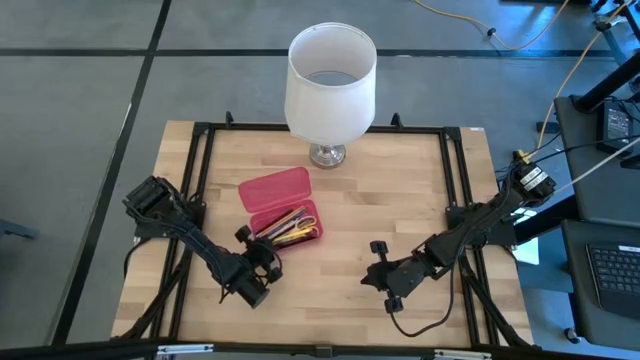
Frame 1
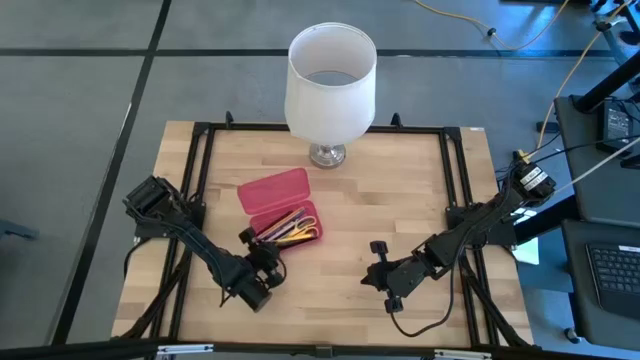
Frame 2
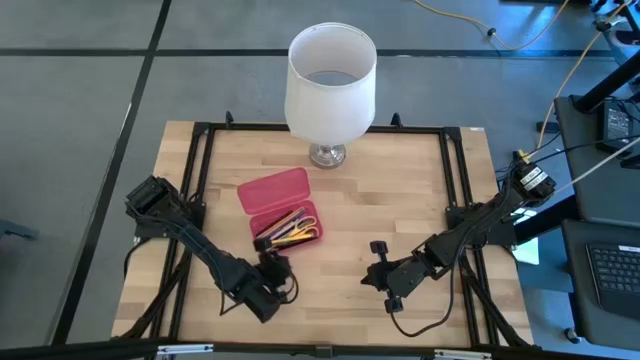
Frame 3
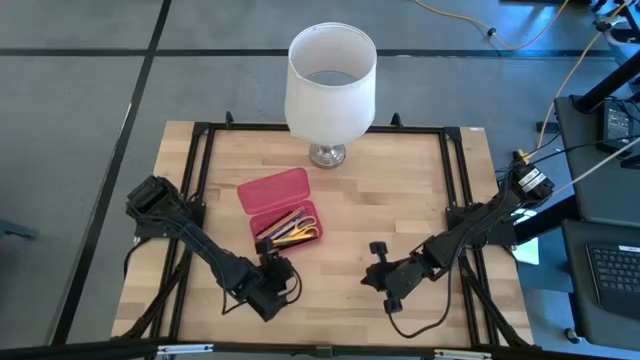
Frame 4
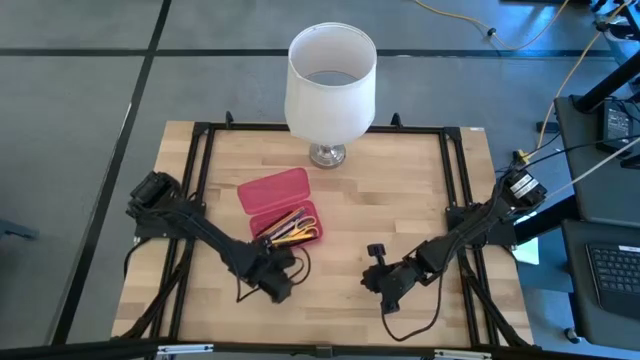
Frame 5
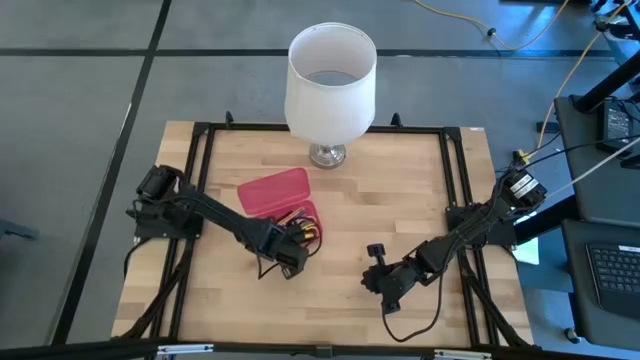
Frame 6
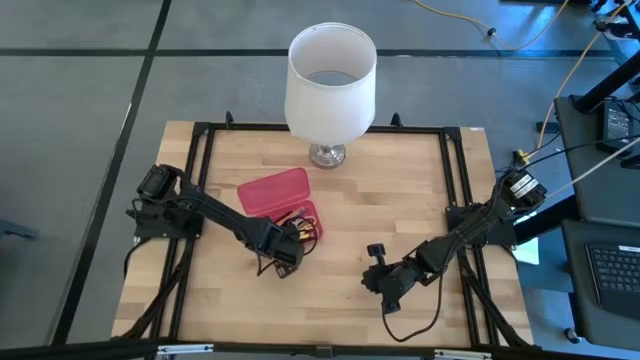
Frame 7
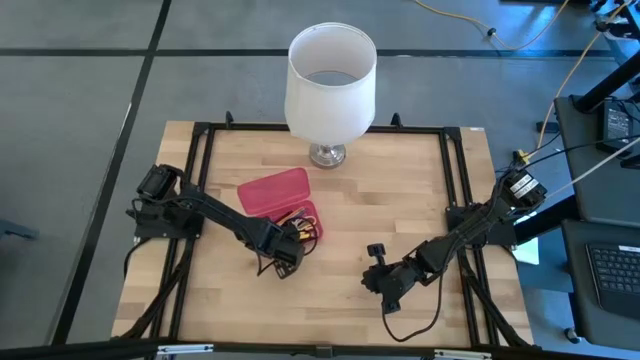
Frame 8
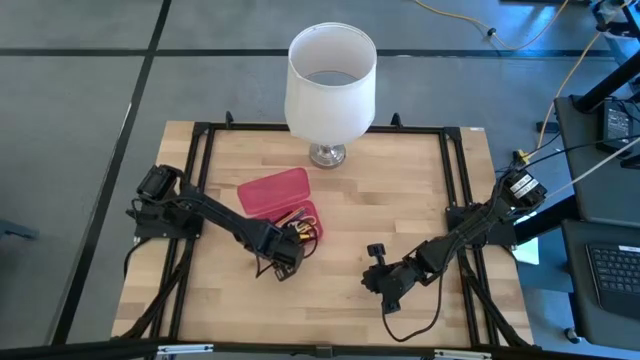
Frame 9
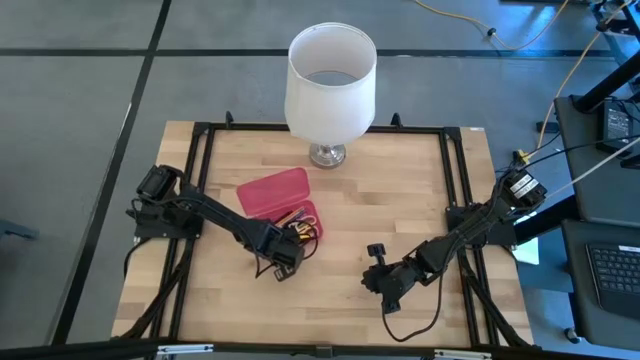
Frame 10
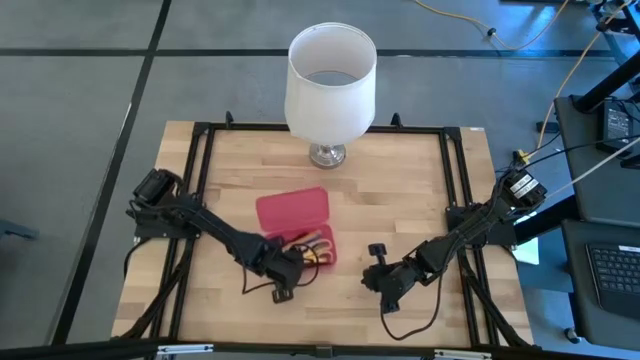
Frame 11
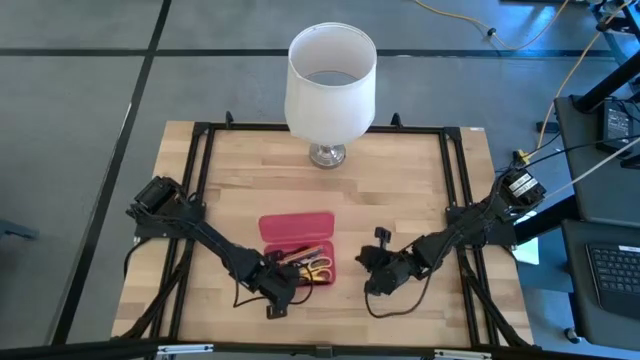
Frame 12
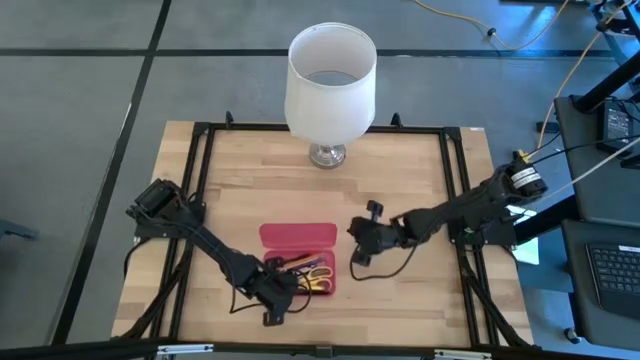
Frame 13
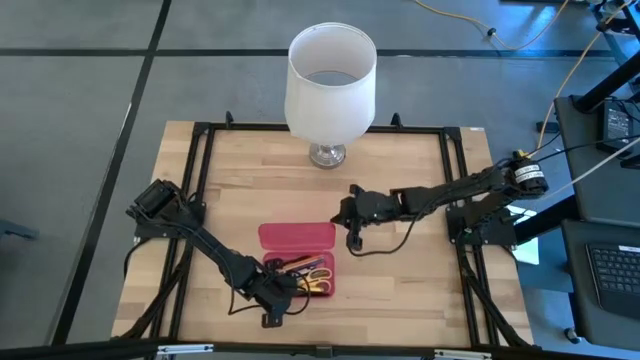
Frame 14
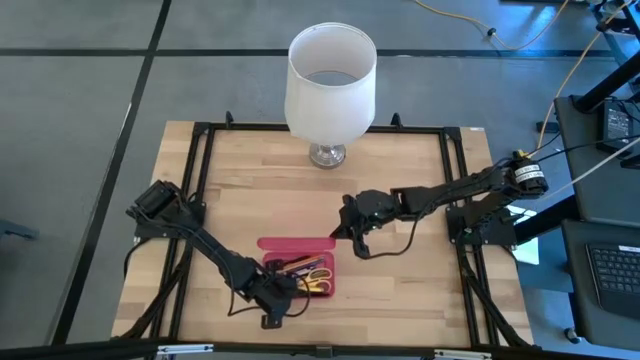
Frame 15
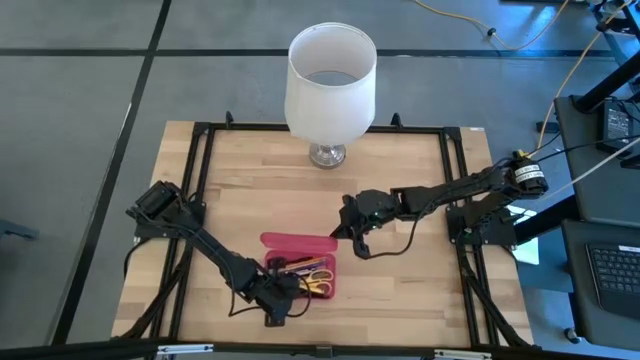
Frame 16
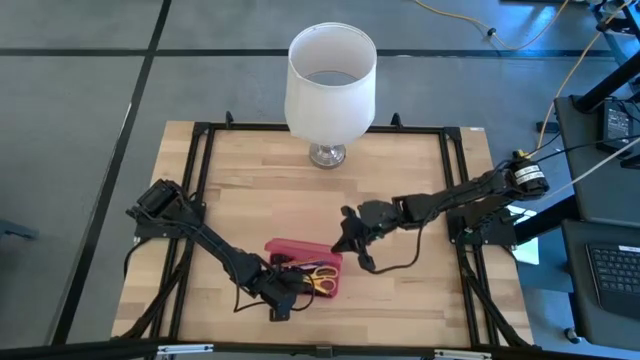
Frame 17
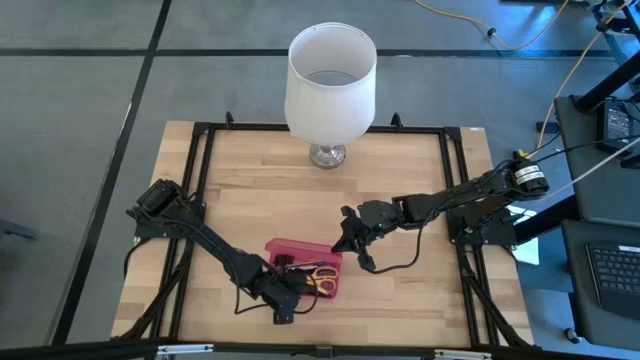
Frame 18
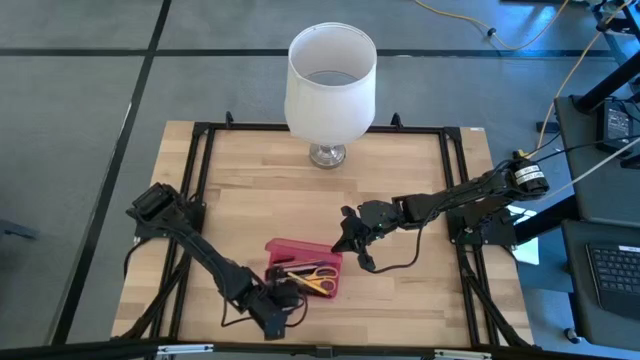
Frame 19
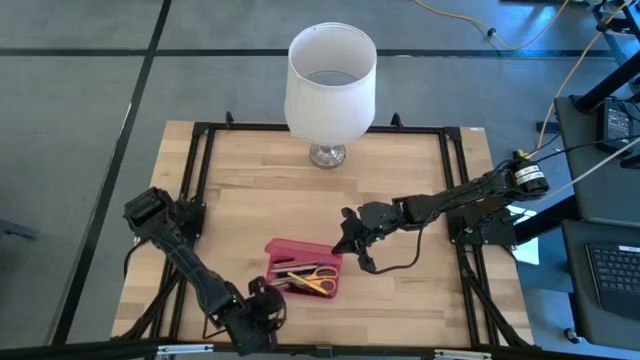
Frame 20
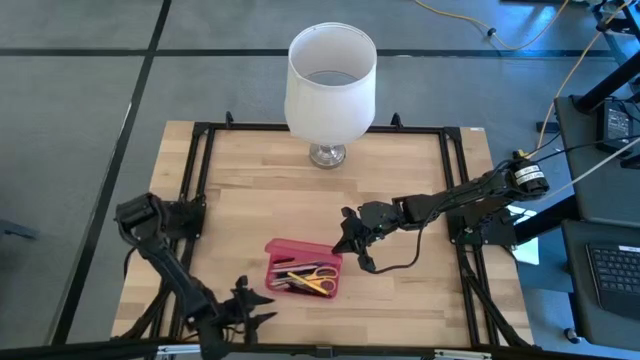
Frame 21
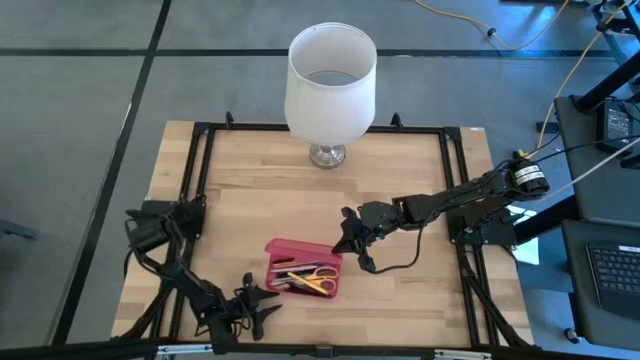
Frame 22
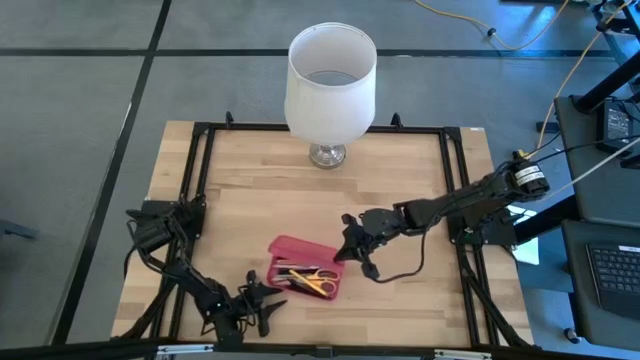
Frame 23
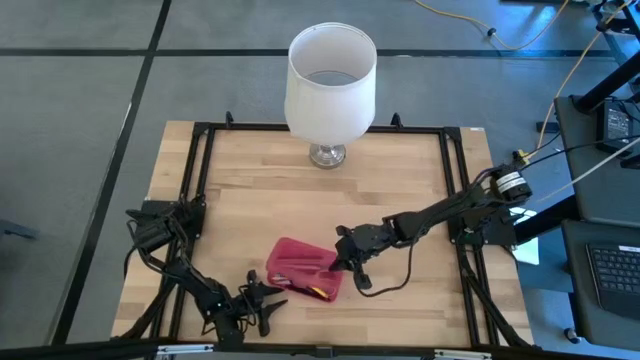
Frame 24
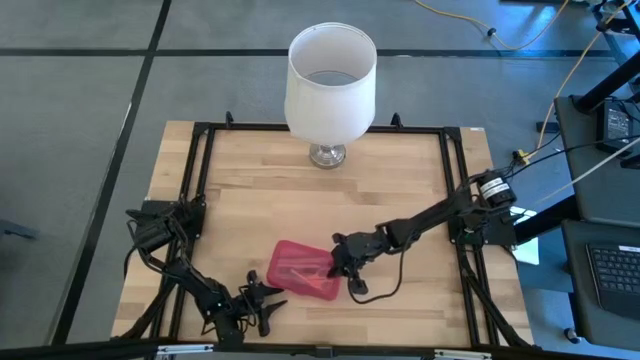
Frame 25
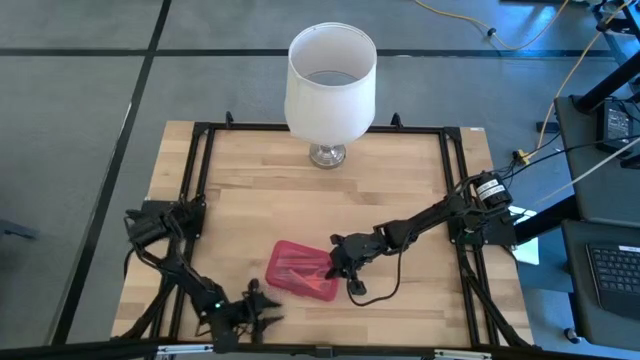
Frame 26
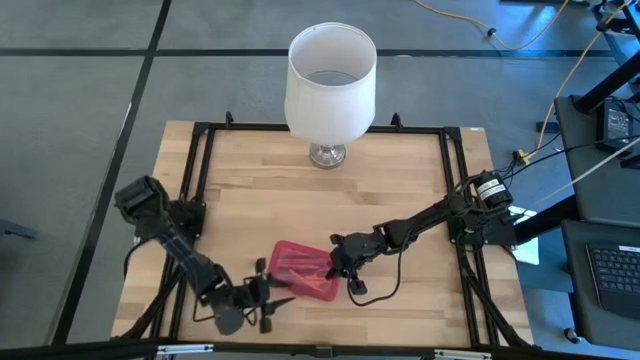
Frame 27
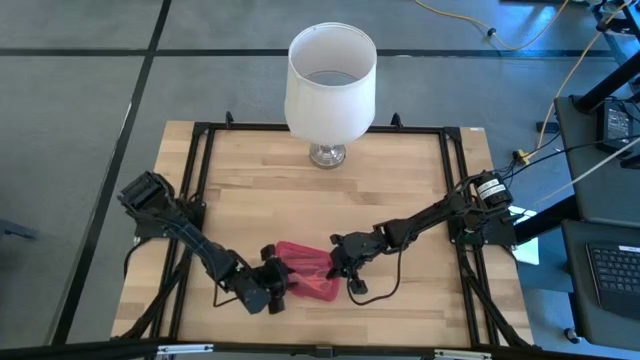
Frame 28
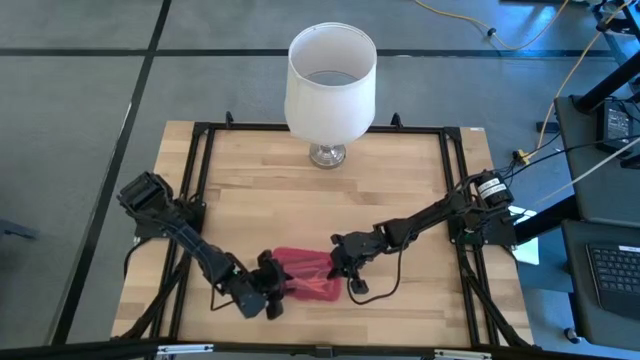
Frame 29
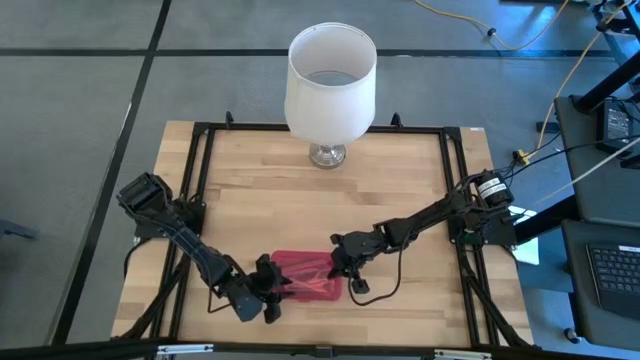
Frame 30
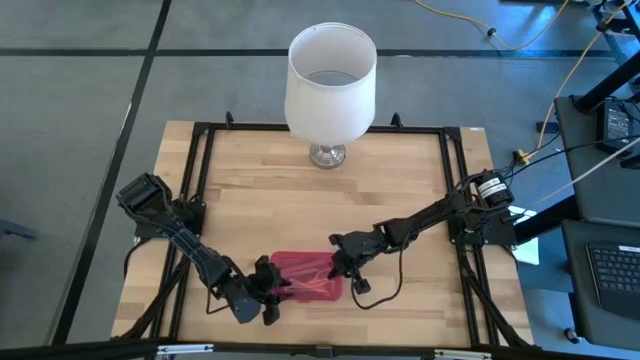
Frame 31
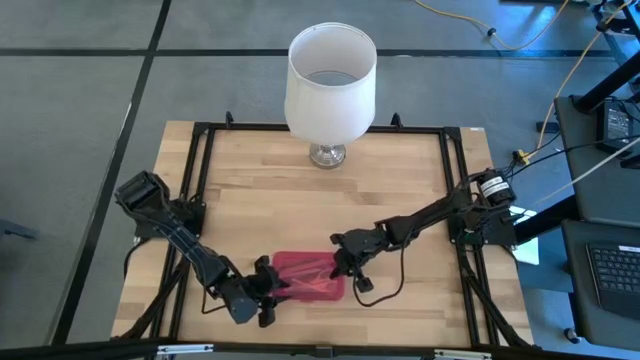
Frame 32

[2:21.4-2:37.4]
Task: Pick & place school supplies into a supply box
Close the red supply box

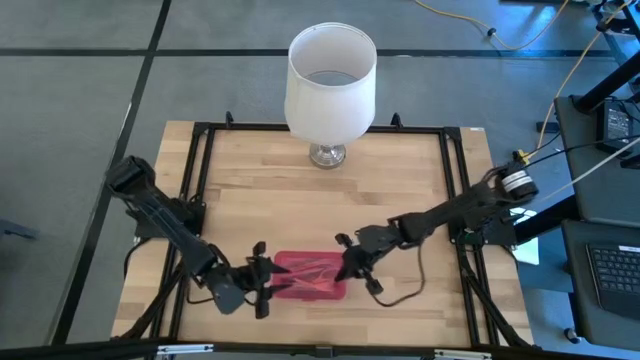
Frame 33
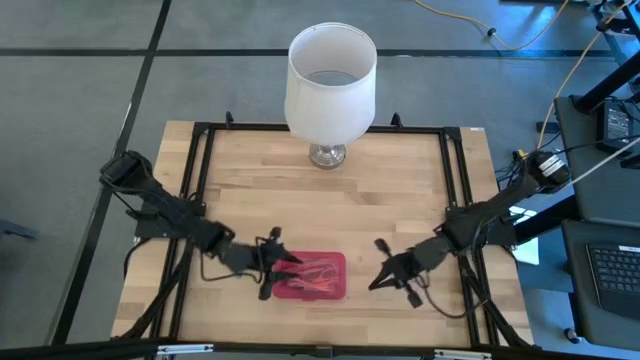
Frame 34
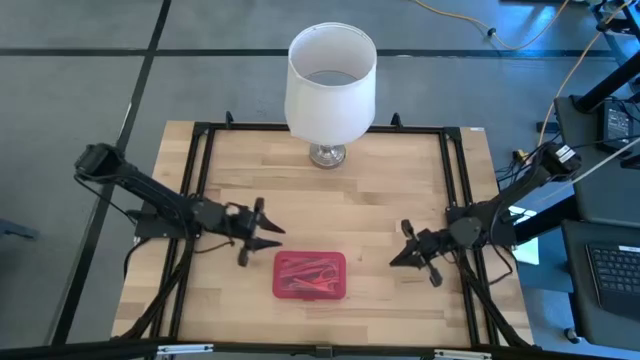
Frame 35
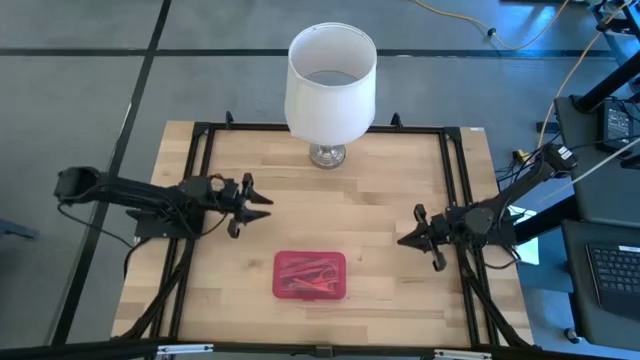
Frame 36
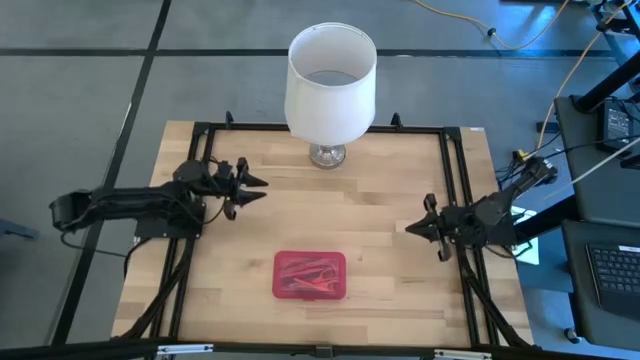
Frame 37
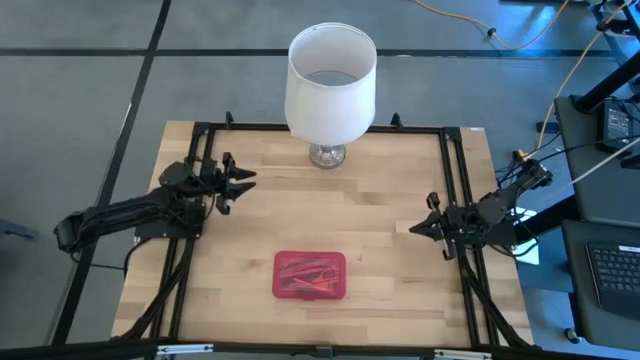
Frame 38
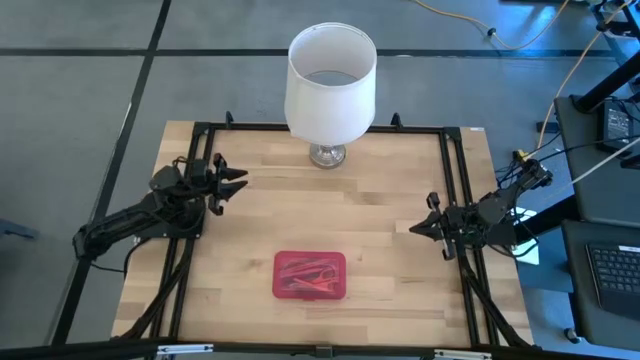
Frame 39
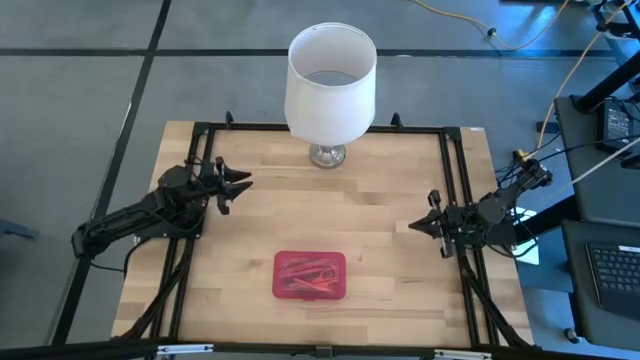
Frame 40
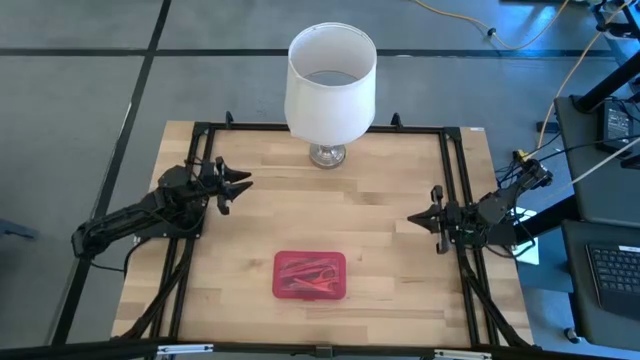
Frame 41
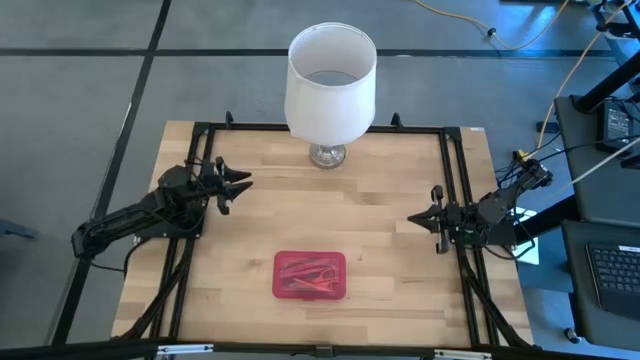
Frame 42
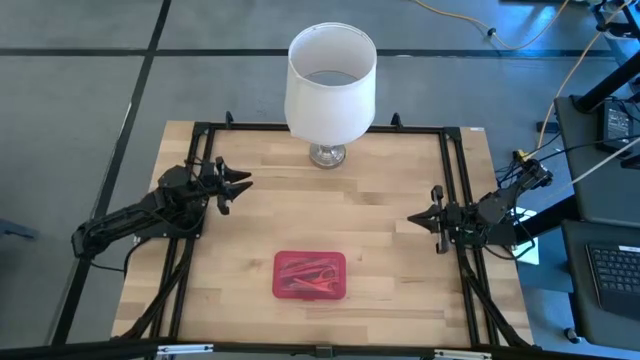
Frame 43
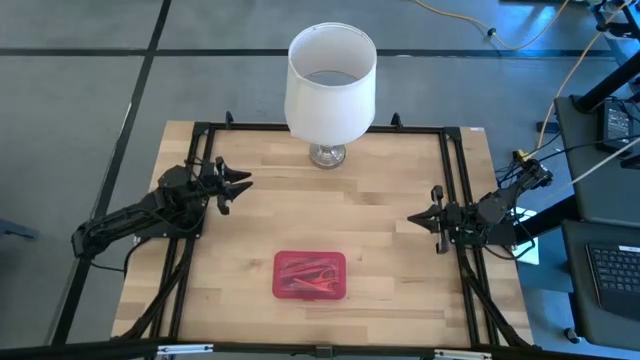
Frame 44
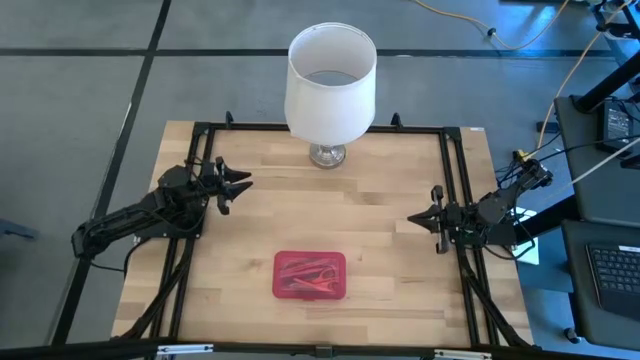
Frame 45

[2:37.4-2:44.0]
Return to Home Position
